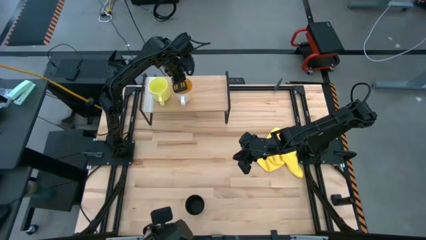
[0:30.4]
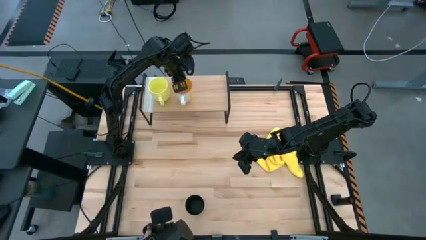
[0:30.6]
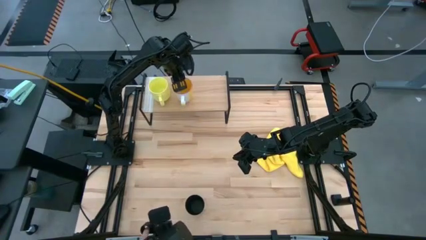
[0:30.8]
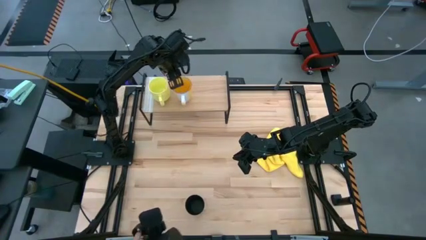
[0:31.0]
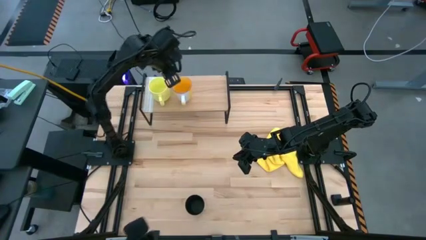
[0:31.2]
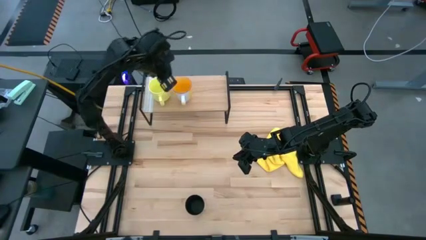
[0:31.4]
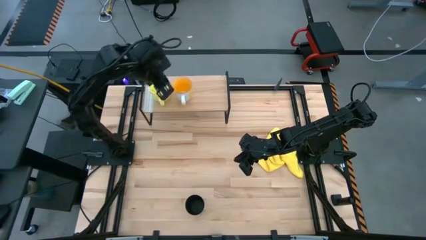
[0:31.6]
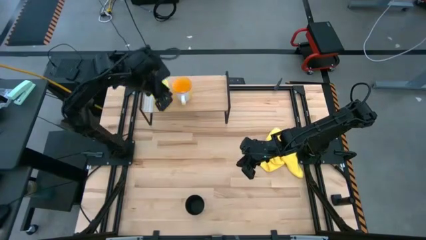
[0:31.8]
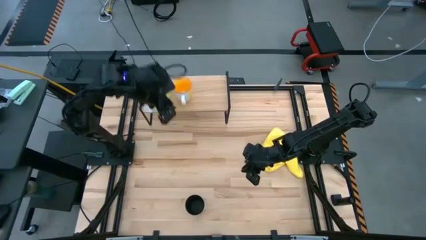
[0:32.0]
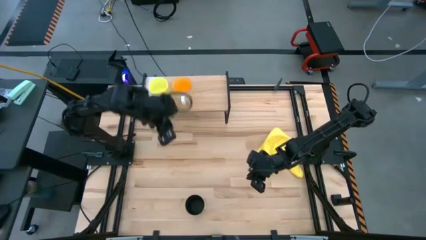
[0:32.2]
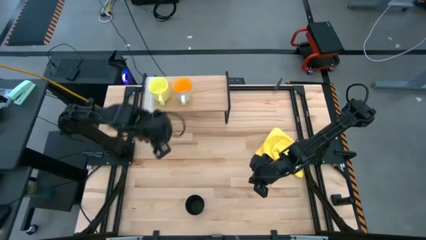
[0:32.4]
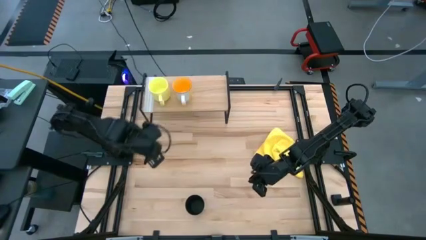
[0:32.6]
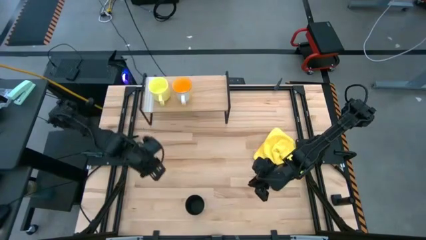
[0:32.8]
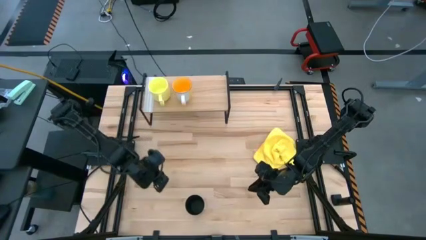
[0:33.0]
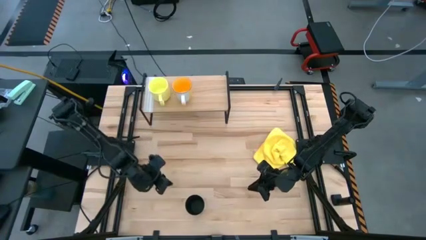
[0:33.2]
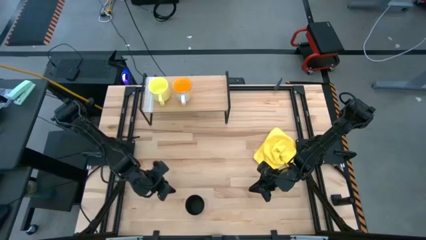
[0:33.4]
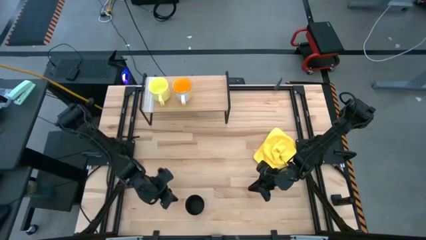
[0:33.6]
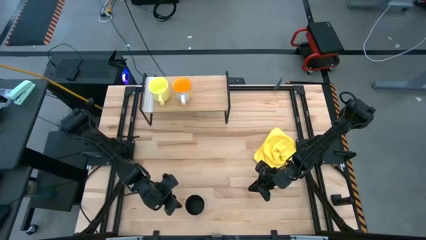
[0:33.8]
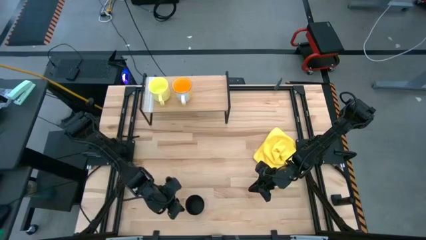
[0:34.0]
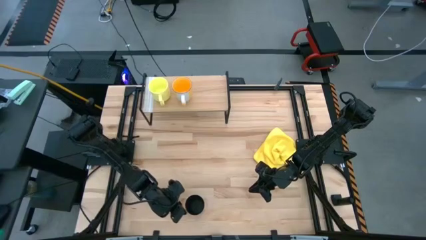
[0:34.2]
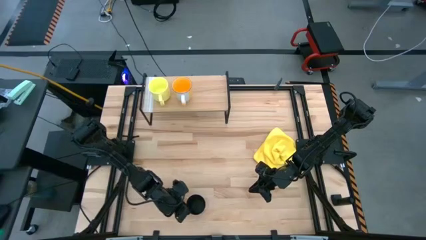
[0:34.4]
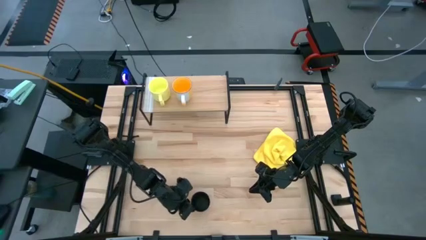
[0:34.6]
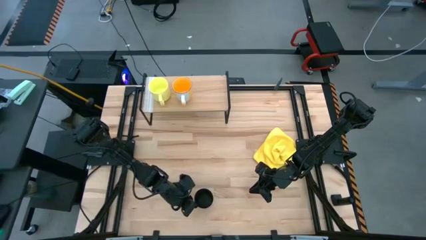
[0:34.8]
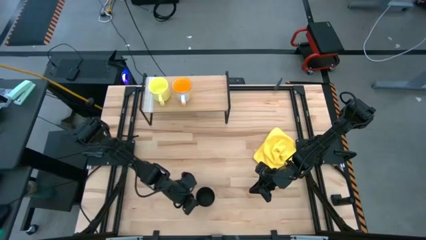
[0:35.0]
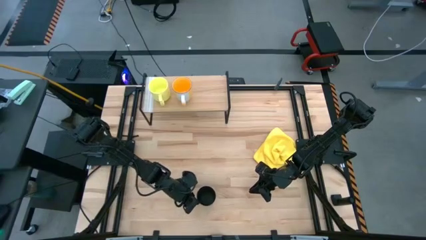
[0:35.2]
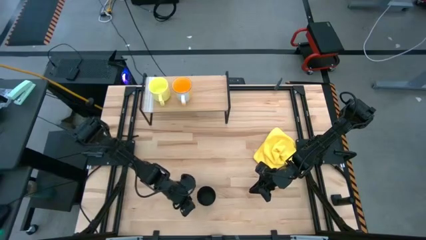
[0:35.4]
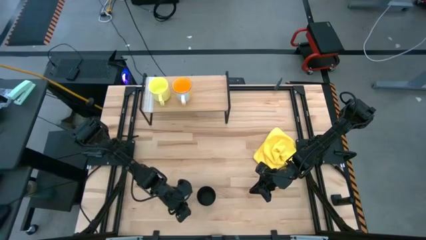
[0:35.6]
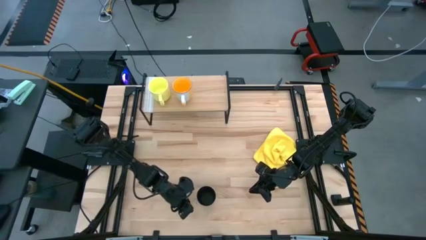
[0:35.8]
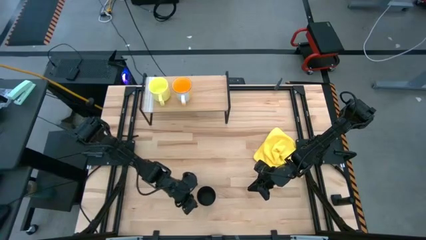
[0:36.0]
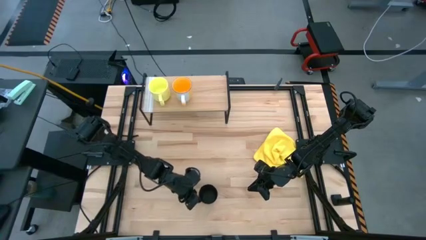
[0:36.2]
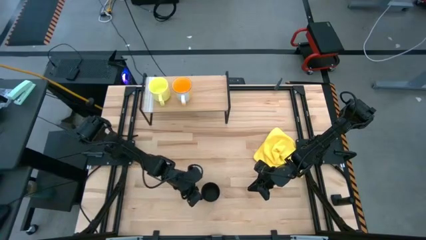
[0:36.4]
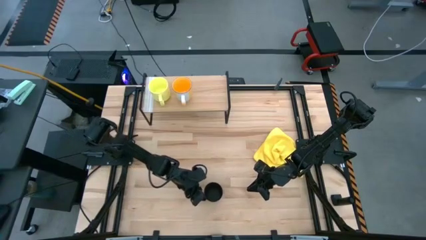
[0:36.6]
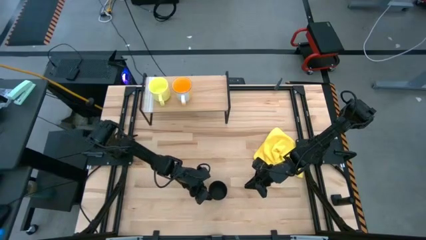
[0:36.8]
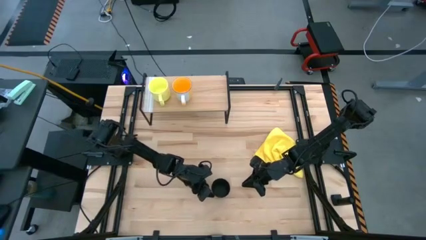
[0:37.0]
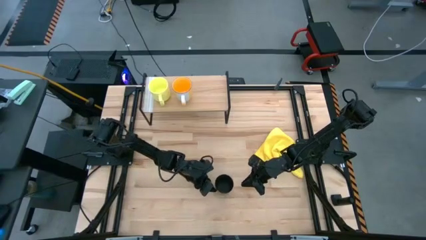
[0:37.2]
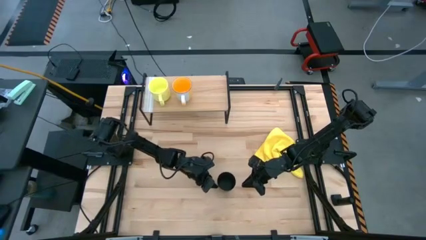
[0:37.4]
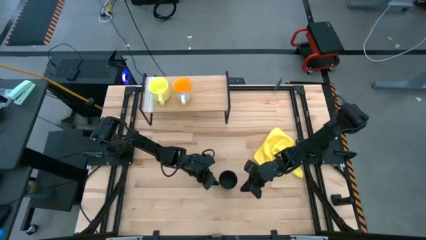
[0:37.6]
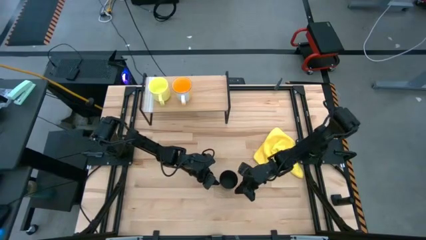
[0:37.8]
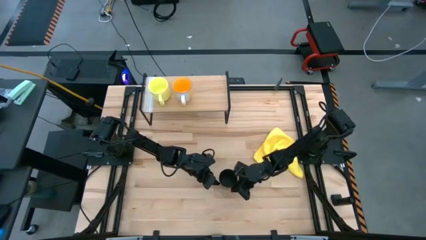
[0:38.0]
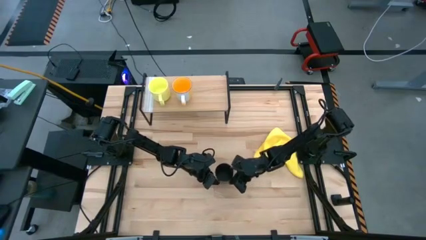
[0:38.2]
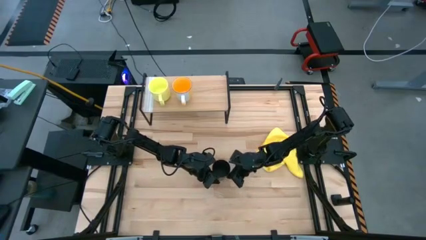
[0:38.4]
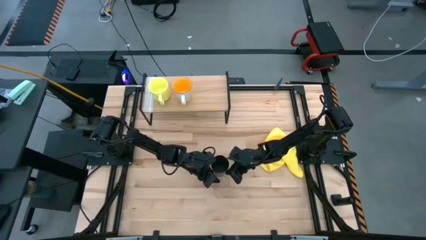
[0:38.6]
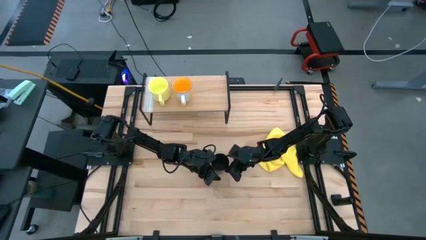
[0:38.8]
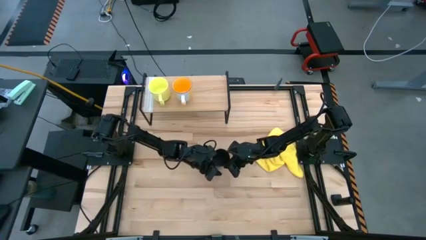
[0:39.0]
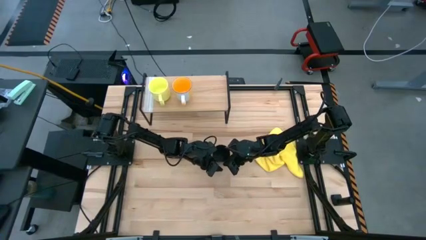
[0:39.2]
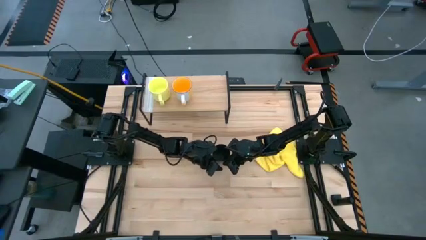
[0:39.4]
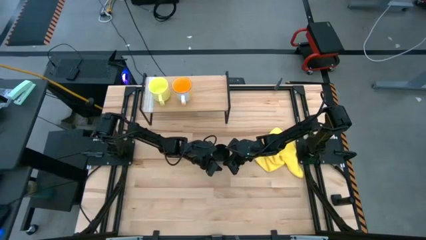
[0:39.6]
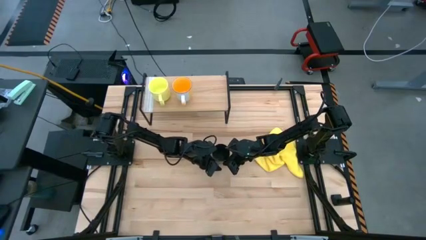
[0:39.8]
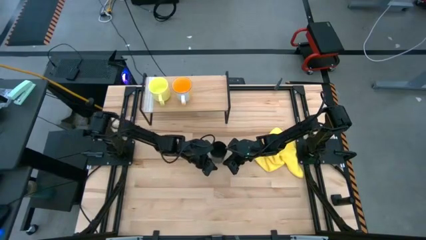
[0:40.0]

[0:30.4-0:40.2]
Task: Stack small to large cups/mugs on shelf
Put the black cup on the shelf

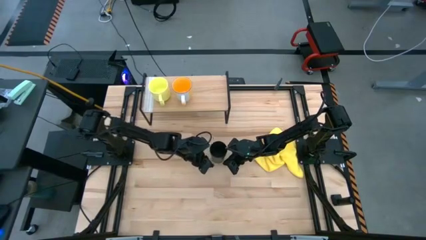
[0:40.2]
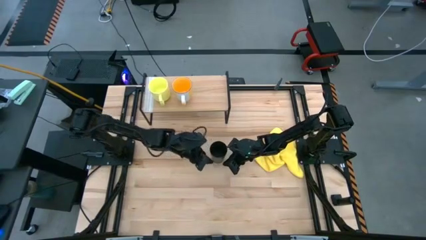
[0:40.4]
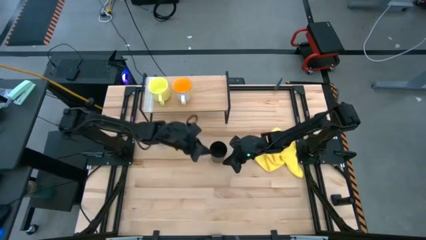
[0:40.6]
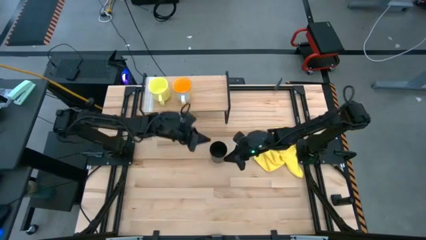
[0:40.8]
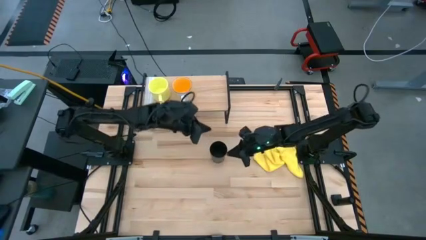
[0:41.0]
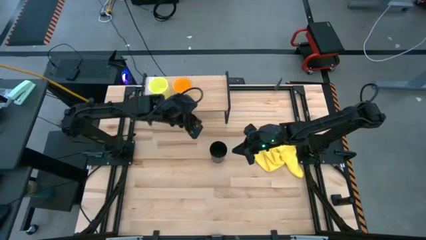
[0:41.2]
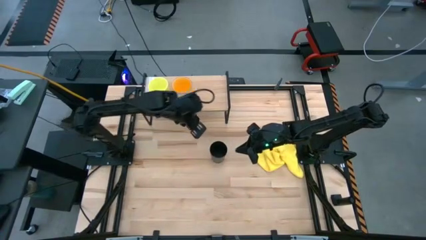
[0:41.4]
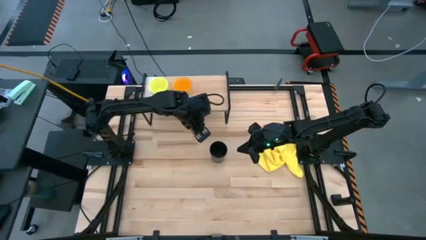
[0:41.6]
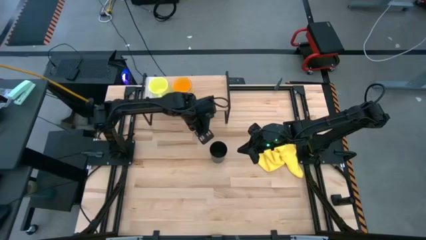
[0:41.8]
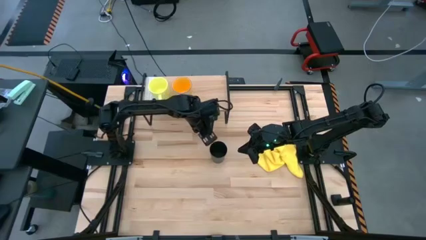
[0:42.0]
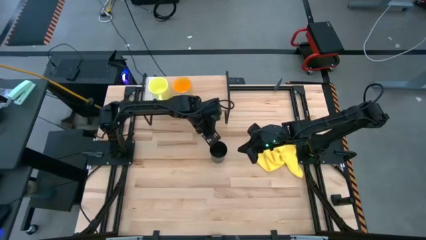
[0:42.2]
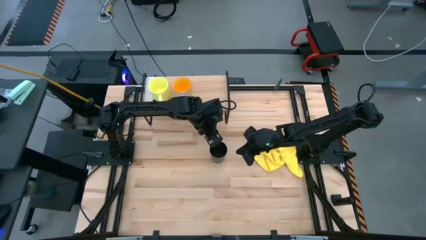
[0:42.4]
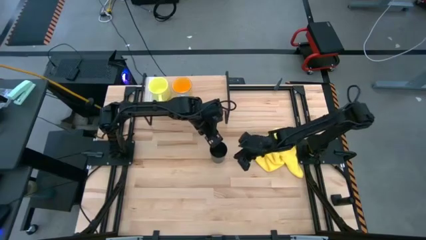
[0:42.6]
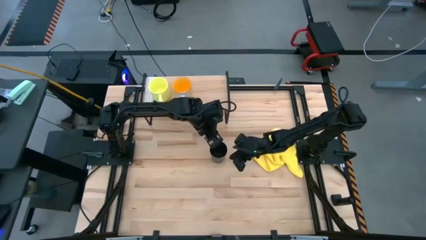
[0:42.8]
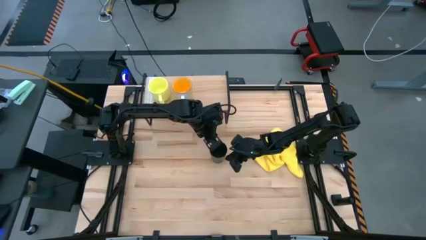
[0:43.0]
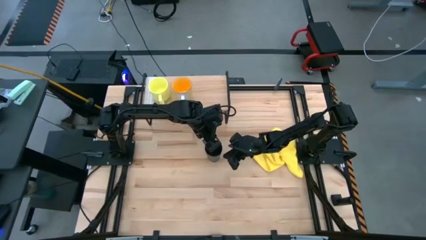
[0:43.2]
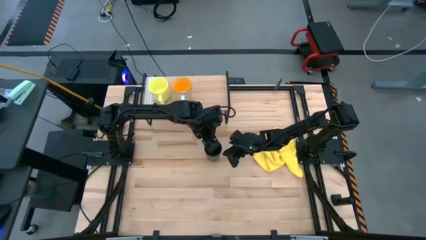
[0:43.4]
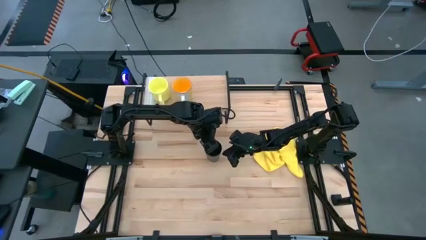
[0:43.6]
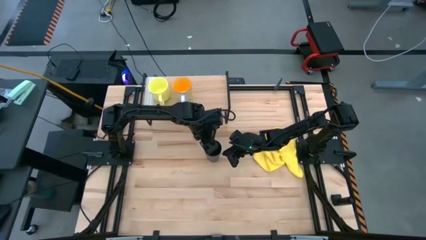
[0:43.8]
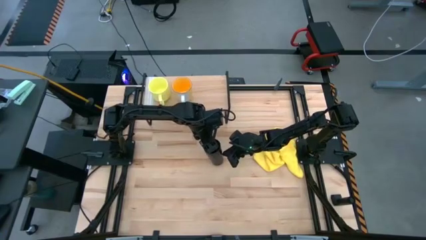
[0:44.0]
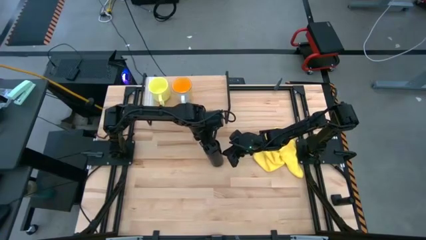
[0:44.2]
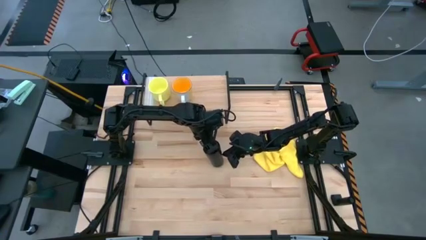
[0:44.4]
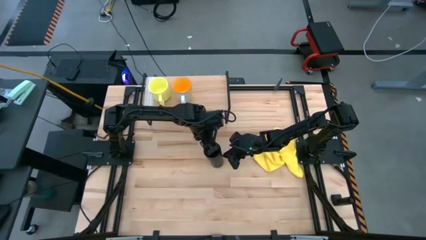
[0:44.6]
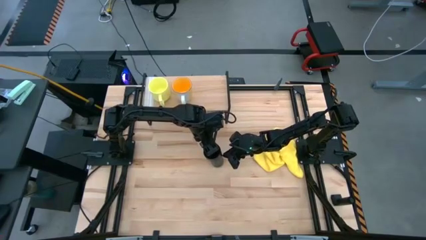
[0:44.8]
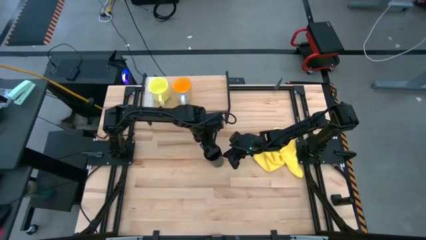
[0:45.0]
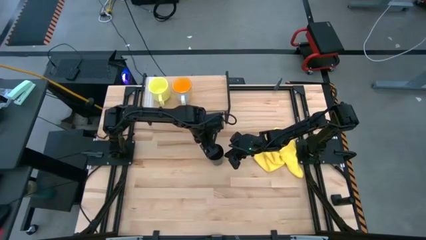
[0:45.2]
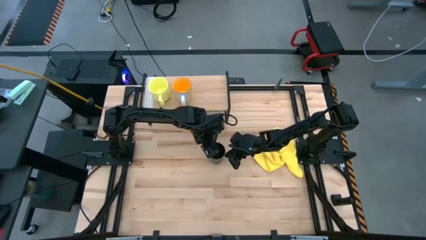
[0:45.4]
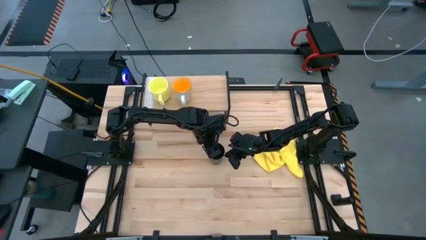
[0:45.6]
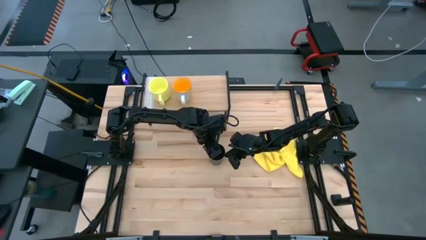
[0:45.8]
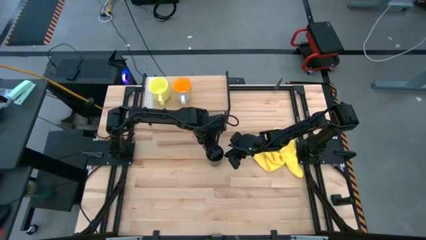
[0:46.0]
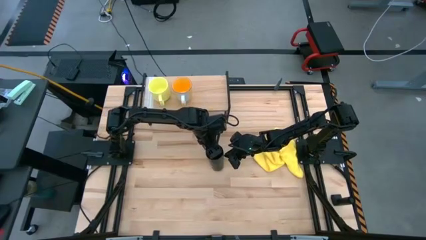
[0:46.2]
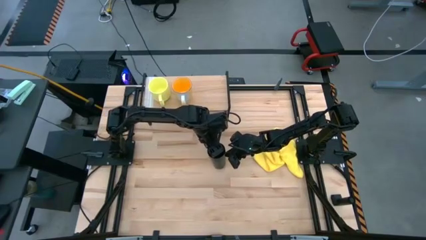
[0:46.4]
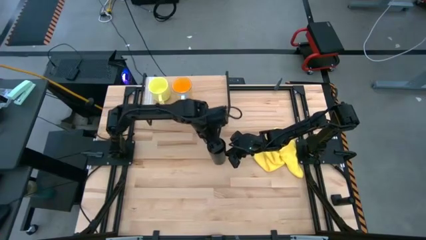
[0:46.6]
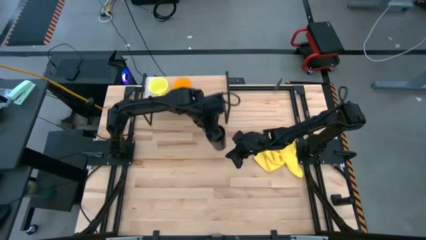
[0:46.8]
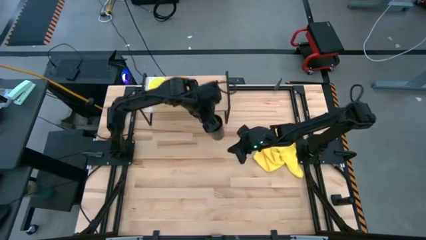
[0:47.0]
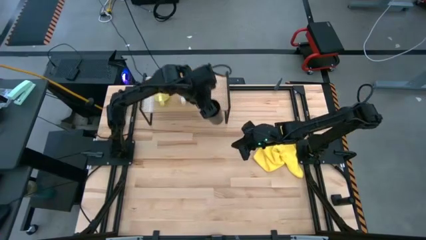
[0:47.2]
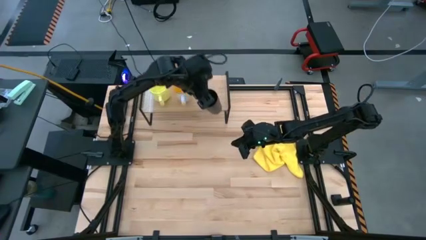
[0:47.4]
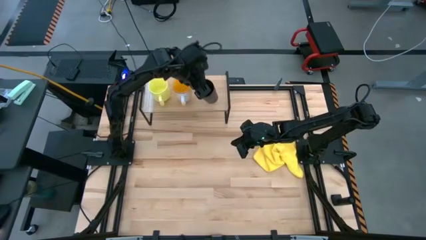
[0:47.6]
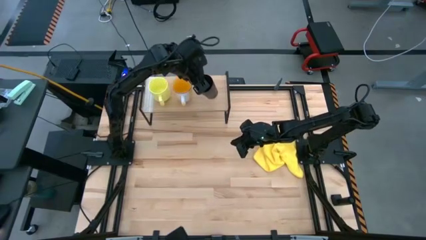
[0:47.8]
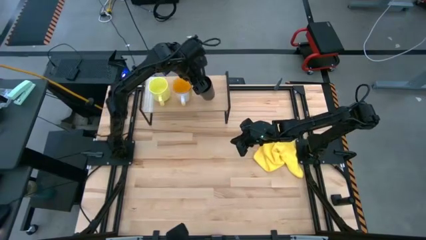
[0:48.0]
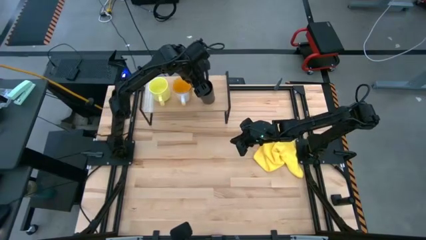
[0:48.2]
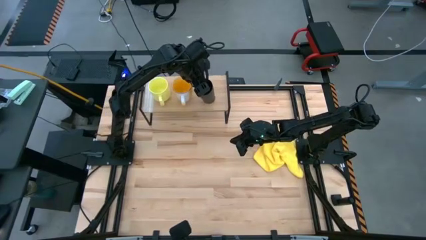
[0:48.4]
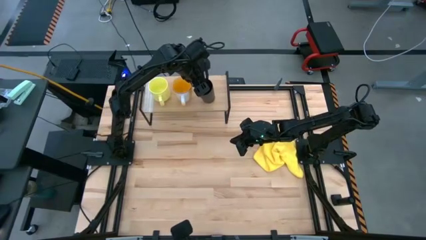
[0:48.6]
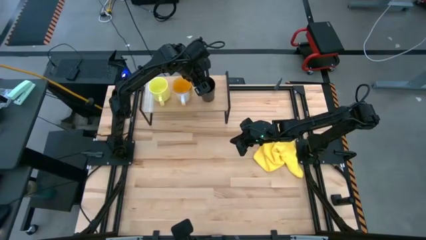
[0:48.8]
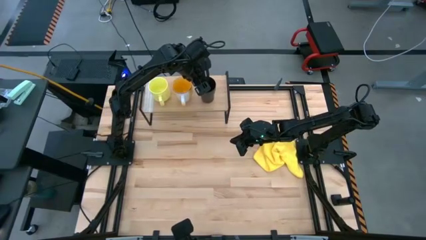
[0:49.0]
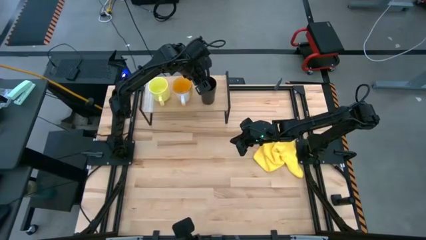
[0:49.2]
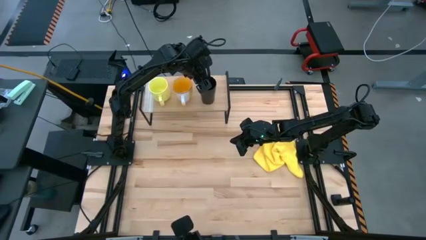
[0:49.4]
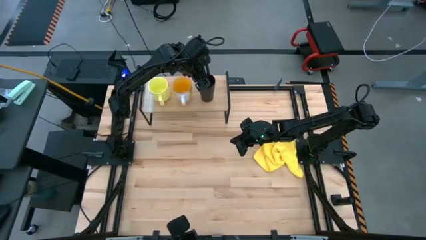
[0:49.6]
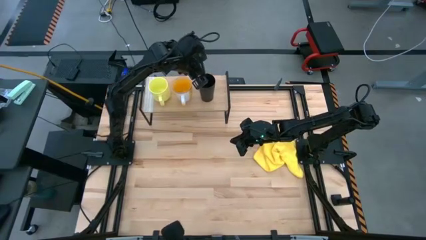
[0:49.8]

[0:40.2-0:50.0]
Put the black cup on the shelf
